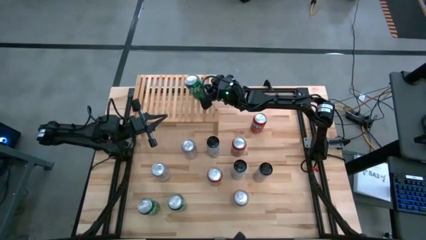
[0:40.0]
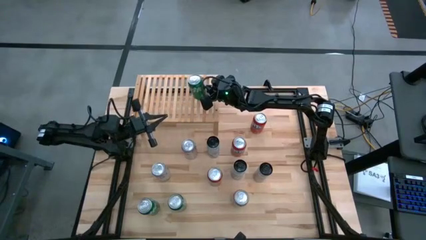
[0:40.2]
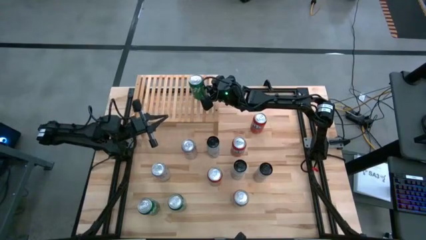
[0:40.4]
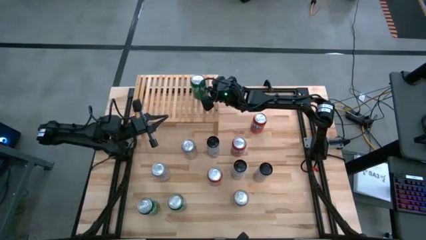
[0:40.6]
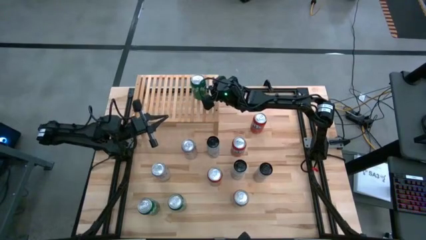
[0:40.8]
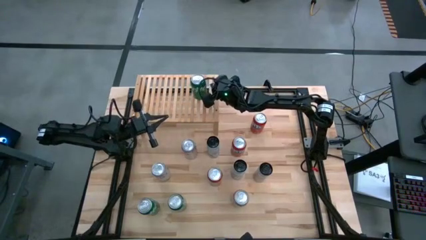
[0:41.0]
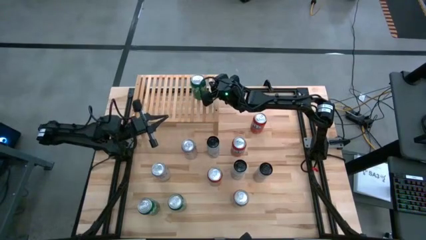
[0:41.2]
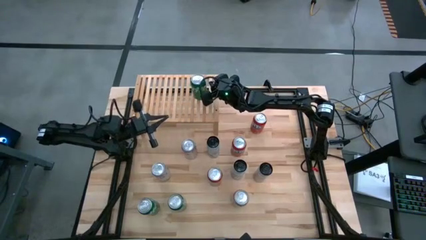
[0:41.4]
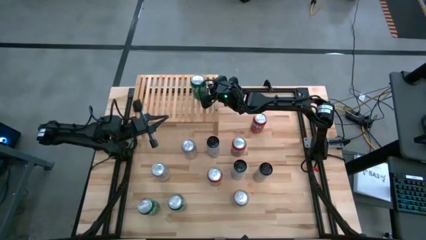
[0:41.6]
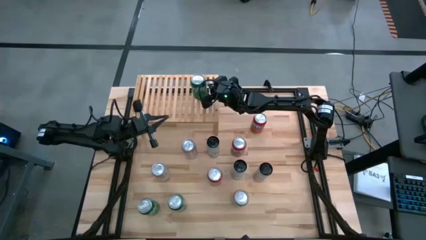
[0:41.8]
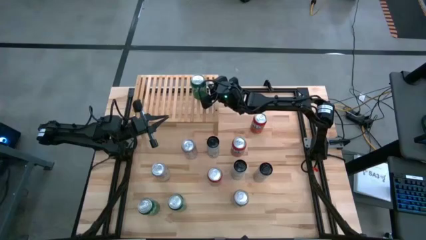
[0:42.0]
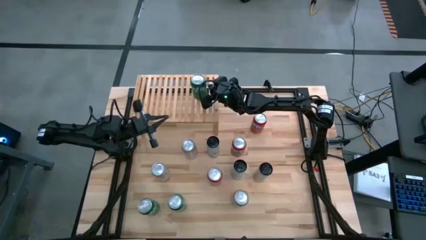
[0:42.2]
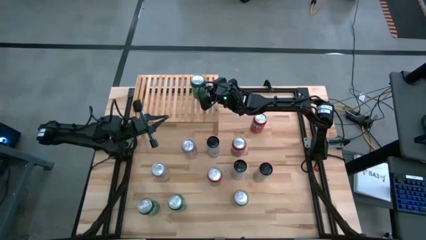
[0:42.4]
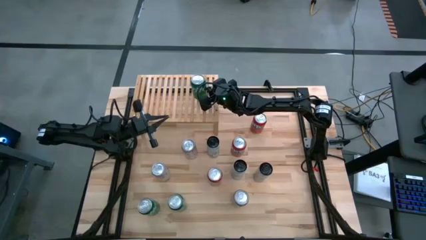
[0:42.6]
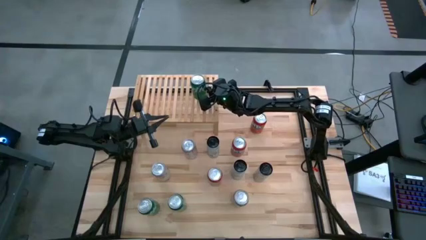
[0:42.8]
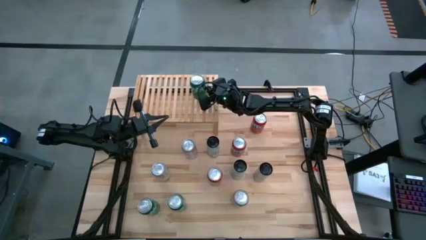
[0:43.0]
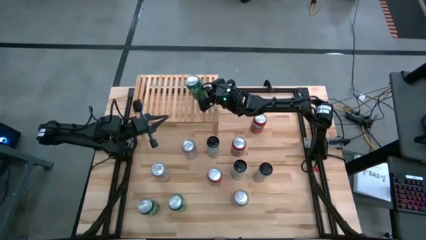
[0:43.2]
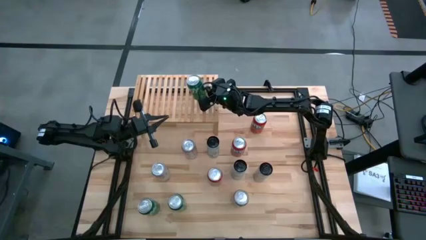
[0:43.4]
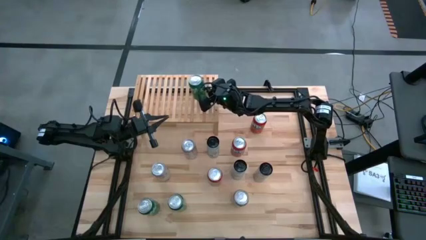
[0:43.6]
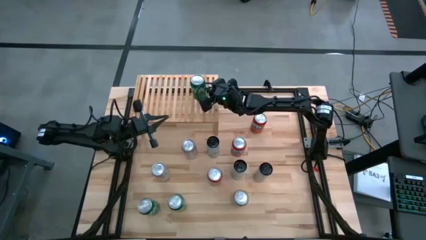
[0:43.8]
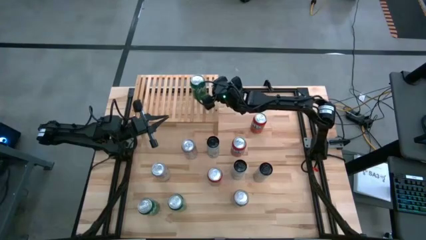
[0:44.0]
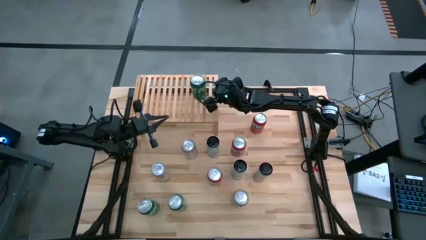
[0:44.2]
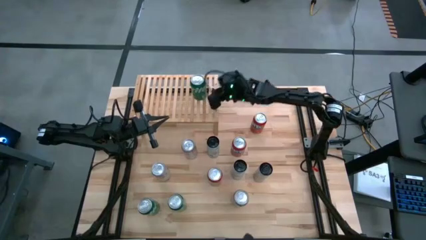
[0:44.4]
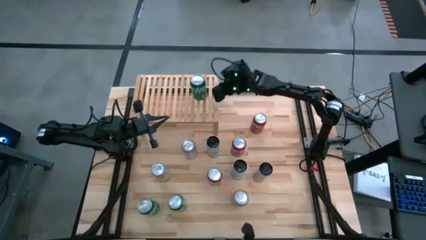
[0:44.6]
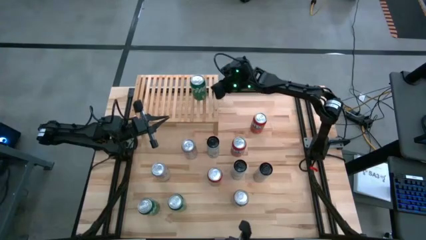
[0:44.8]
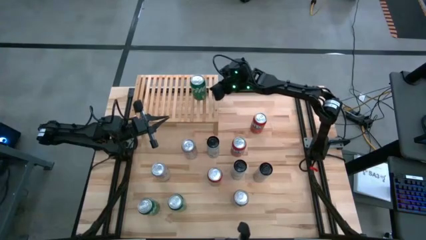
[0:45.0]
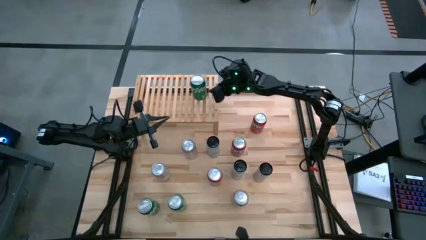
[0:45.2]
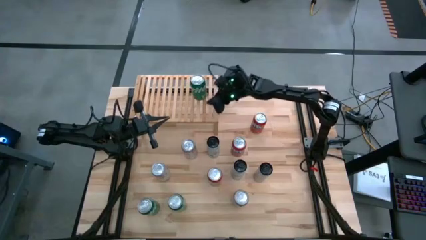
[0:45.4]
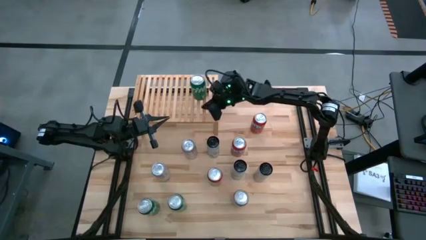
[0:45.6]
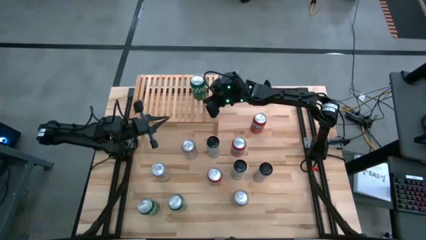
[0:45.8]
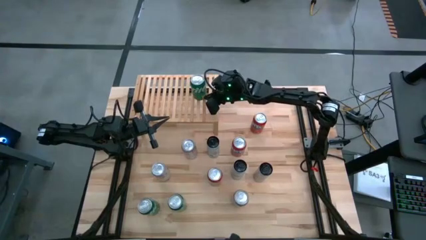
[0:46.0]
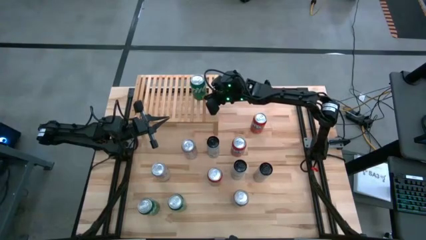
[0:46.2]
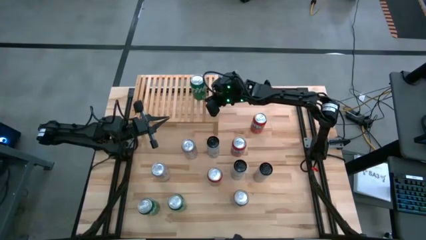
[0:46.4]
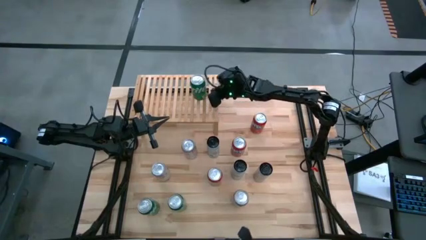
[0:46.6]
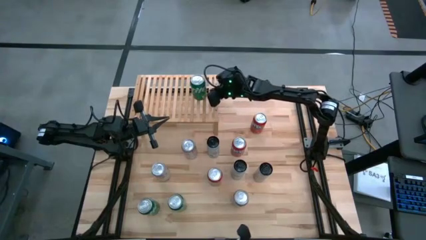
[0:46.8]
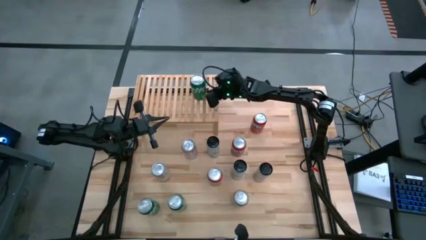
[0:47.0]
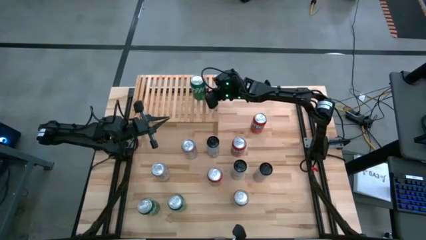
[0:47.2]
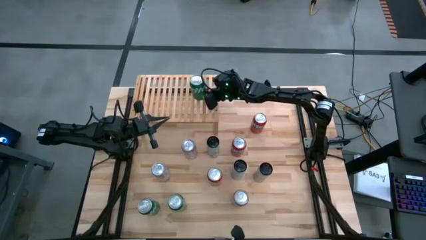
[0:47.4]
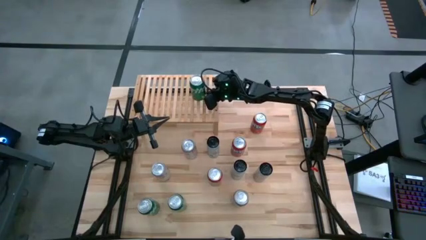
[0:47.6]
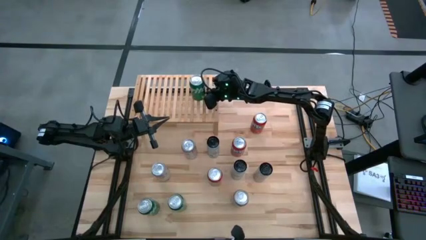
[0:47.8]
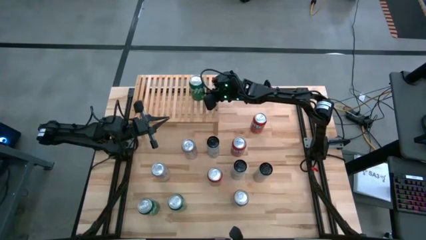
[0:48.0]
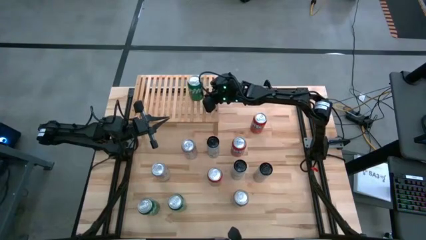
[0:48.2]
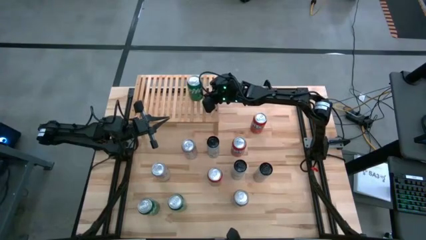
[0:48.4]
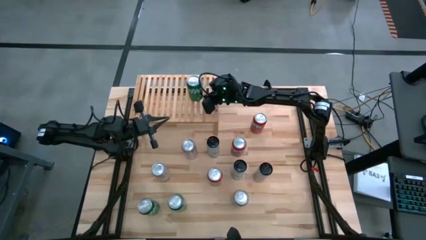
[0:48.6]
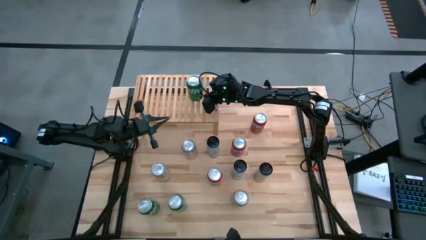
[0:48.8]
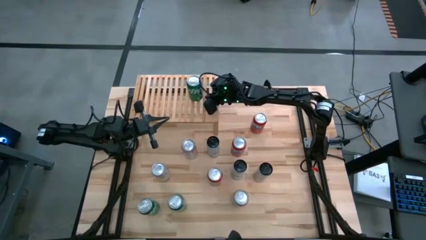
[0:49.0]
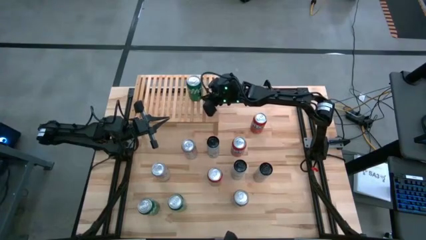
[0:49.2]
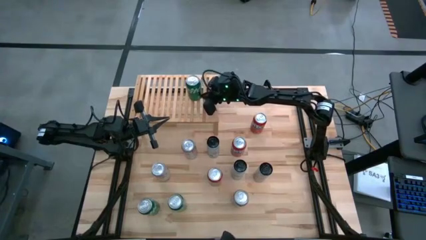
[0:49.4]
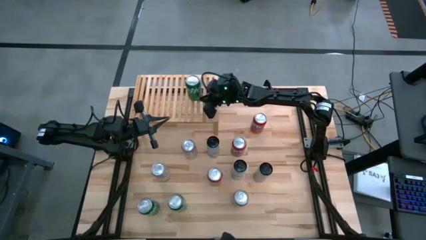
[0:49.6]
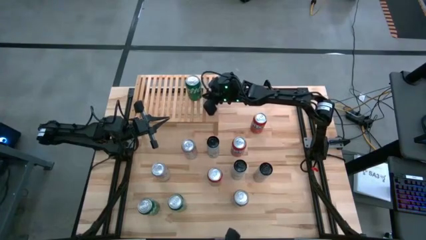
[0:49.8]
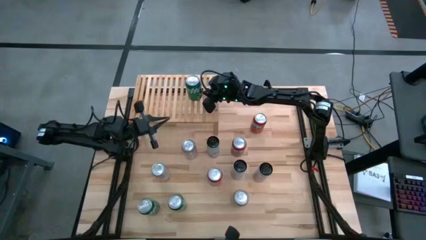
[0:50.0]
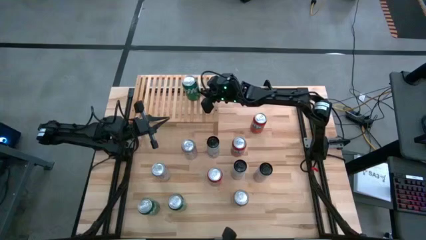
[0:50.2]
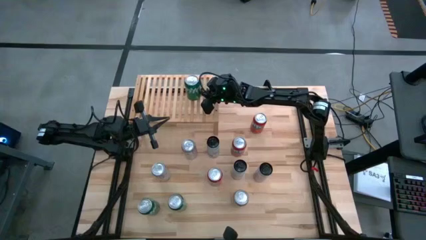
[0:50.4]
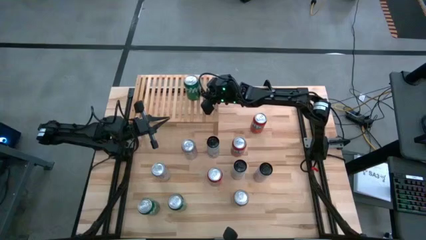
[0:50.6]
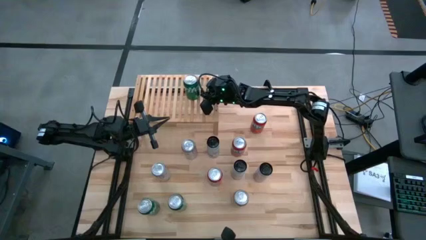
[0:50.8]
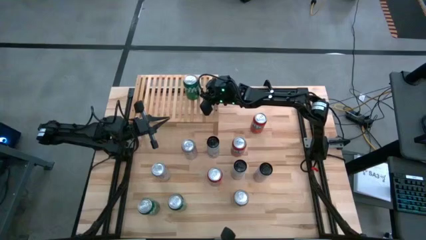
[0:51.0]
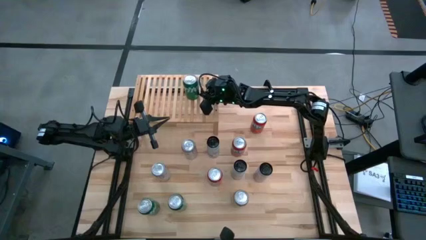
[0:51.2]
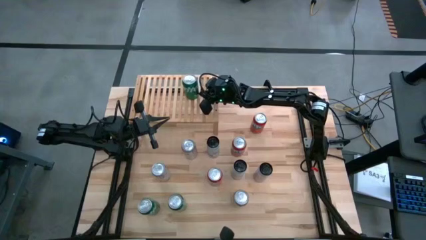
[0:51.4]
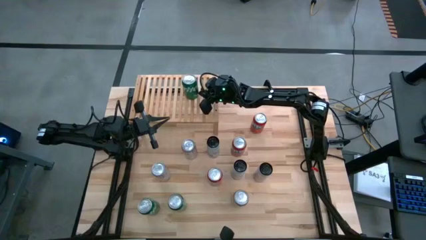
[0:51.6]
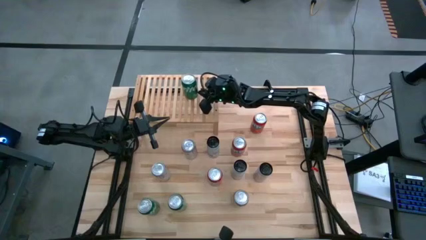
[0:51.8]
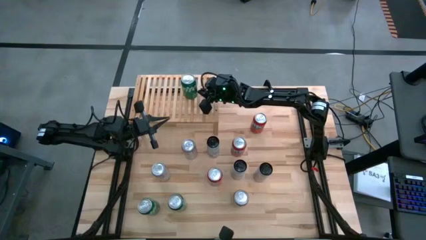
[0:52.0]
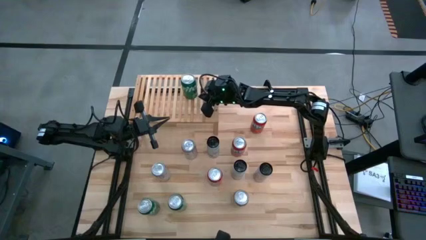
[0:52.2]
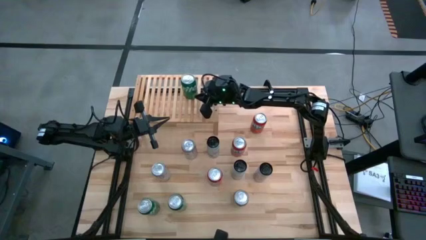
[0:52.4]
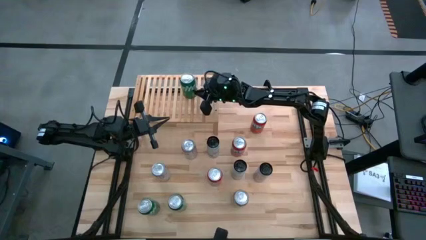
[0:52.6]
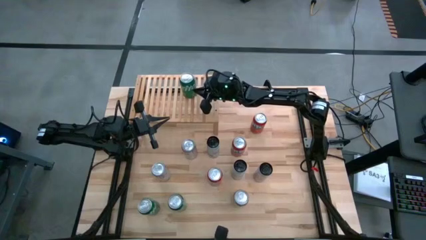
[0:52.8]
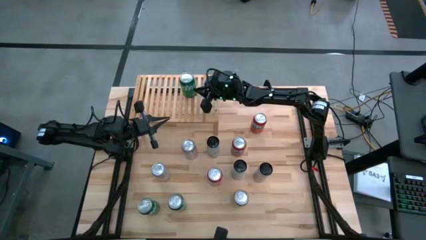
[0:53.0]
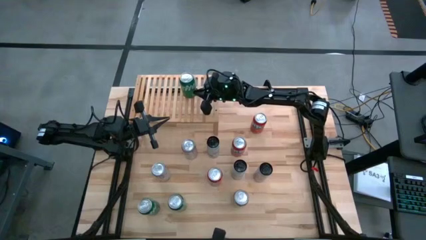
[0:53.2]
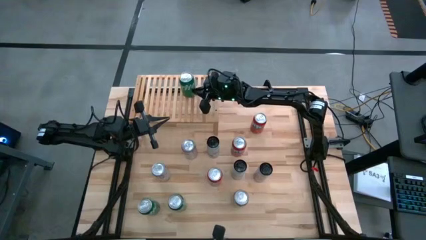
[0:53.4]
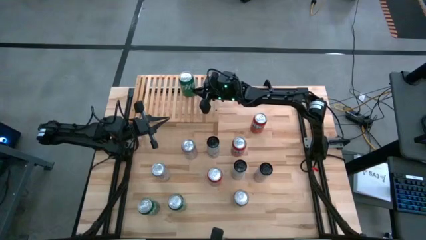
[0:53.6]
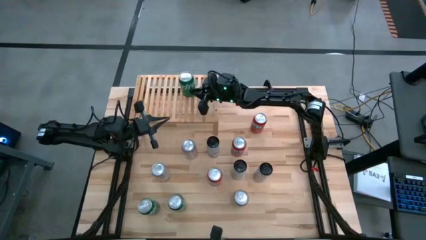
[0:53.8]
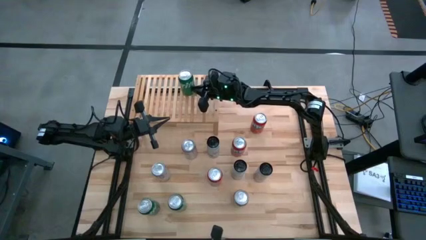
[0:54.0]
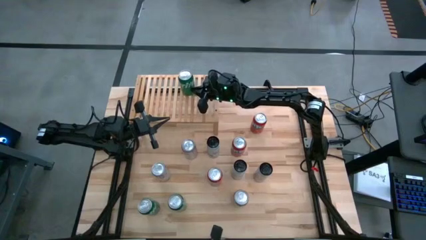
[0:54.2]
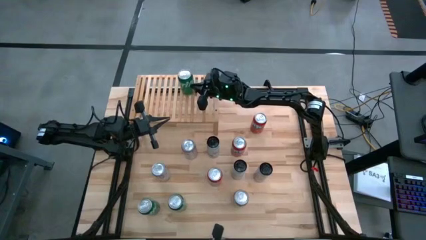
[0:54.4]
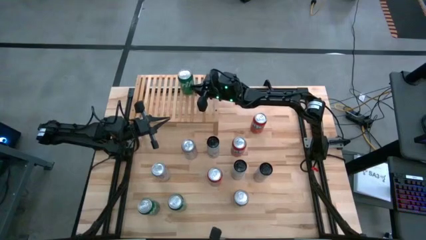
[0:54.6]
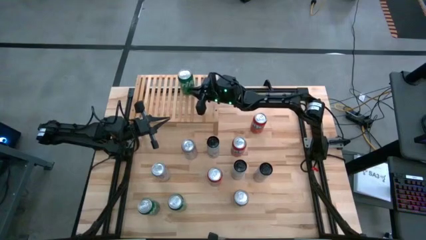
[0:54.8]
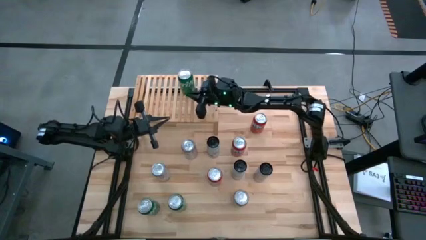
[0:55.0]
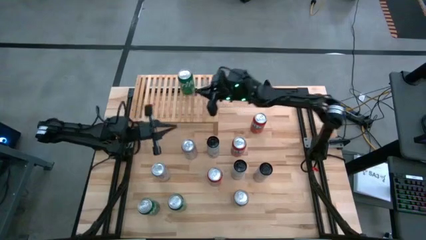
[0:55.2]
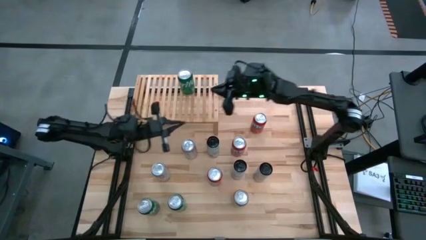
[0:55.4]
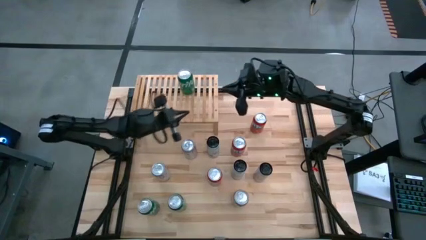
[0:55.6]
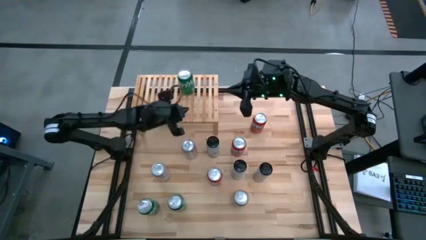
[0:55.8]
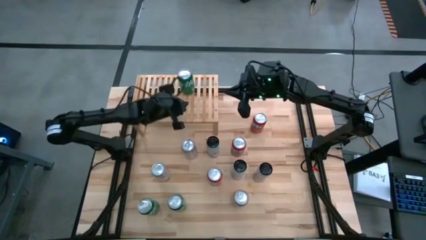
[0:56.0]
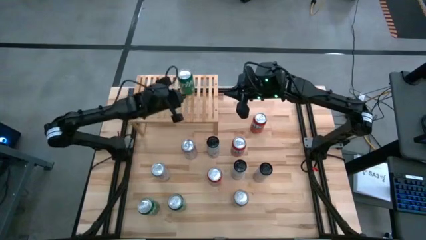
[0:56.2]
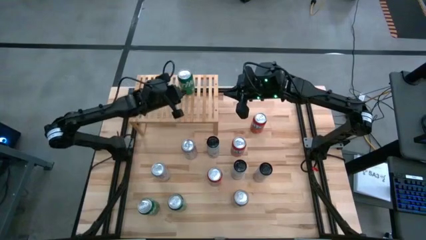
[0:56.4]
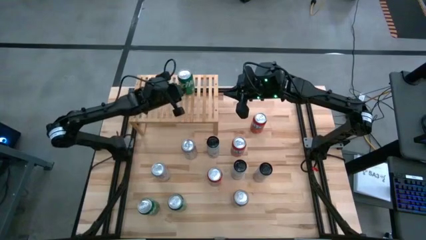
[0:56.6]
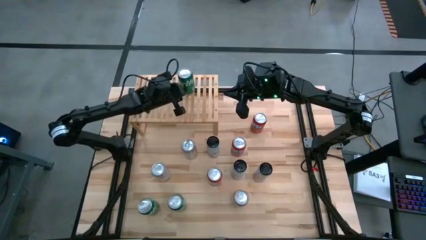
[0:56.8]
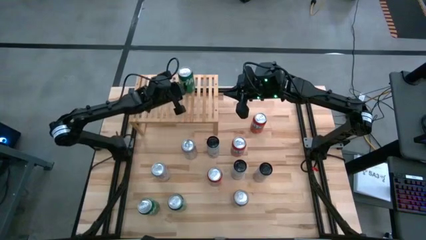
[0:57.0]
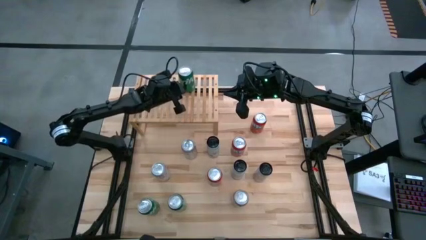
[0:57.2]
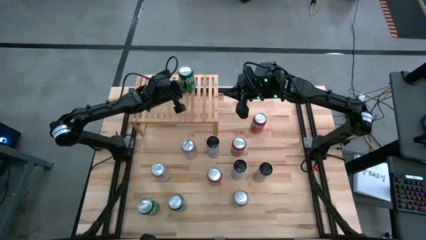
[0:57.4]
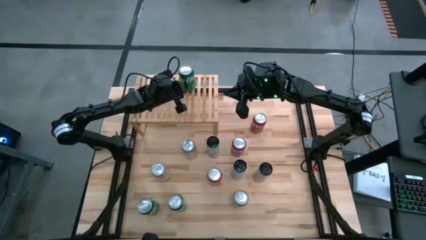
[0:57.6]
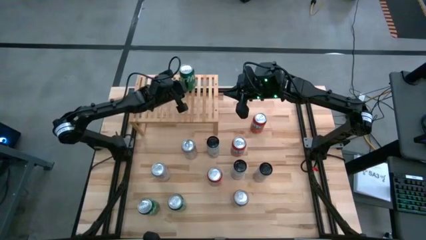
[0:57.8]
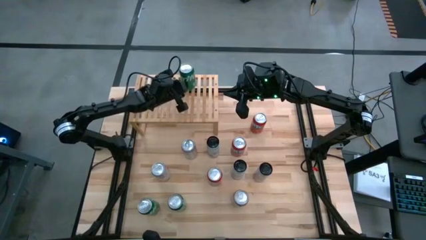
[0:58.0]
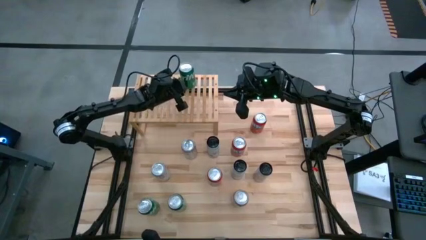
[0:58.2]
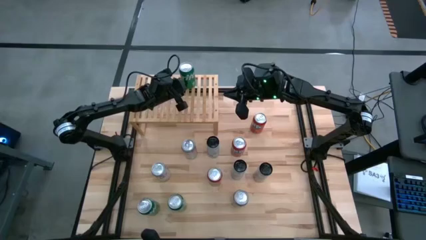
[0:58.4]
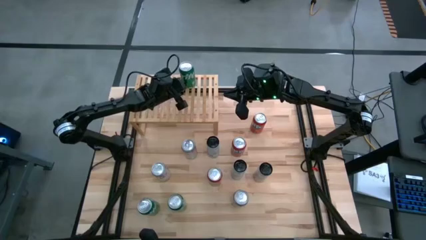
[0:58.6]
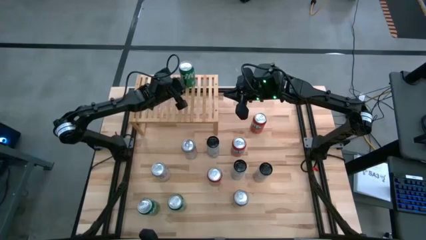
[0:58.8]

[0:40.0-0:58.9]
Task: Place canned beverage on shelf
Put the right green soda can on the shelf
